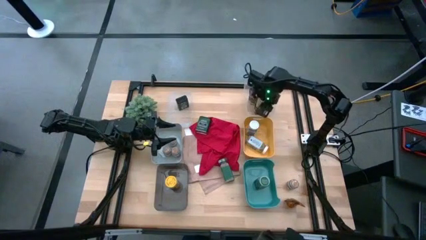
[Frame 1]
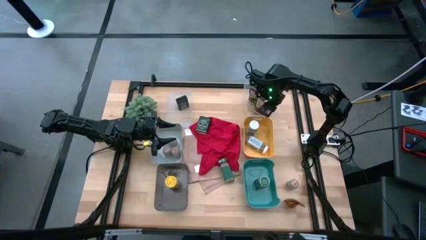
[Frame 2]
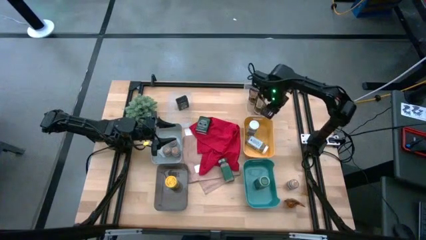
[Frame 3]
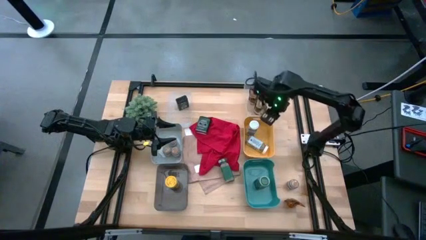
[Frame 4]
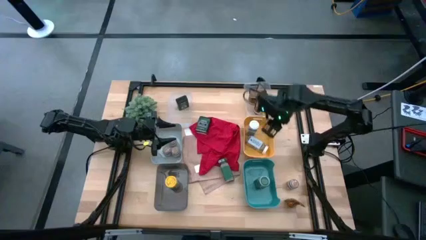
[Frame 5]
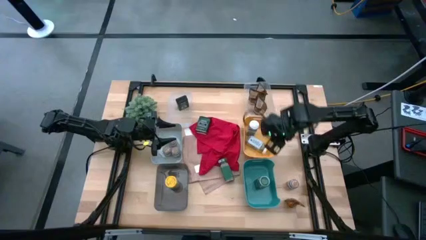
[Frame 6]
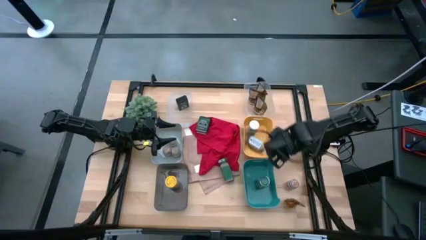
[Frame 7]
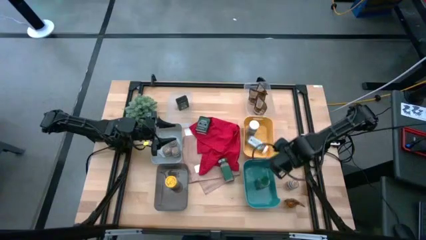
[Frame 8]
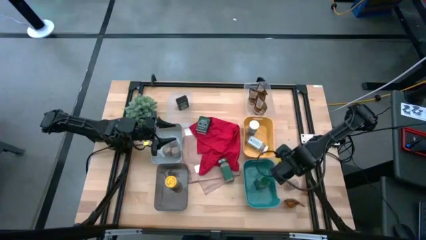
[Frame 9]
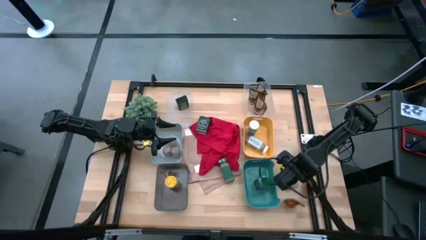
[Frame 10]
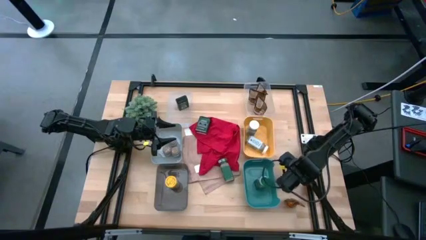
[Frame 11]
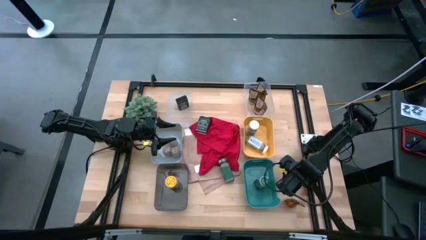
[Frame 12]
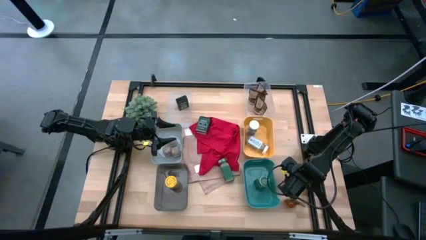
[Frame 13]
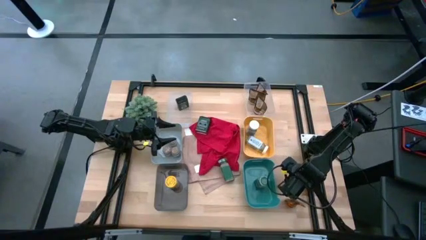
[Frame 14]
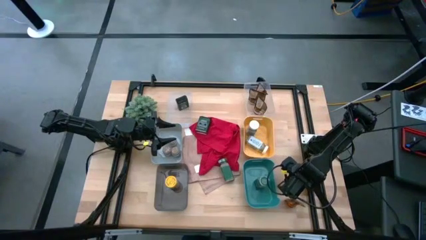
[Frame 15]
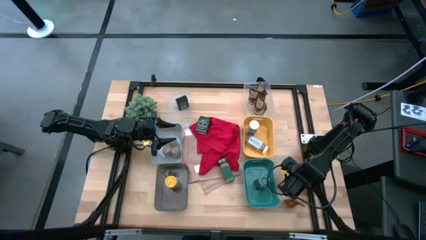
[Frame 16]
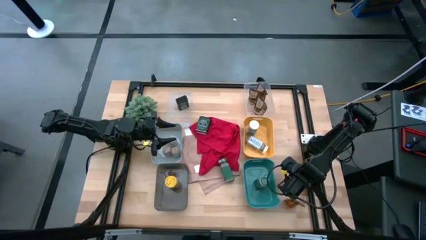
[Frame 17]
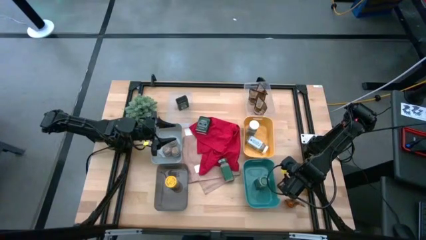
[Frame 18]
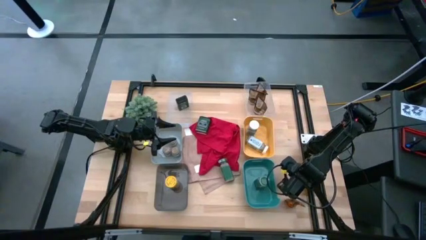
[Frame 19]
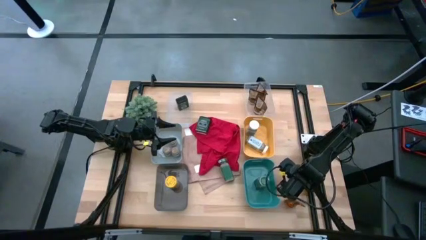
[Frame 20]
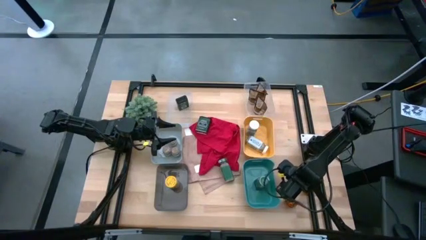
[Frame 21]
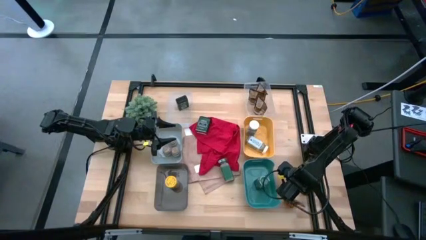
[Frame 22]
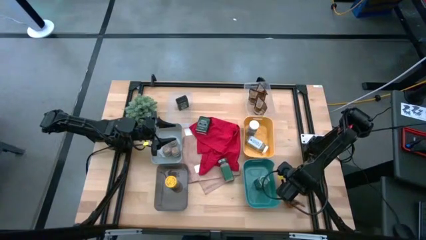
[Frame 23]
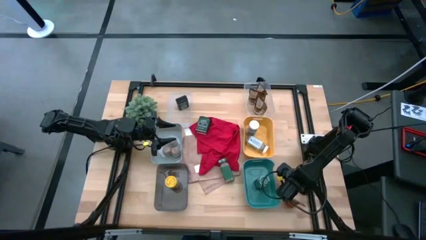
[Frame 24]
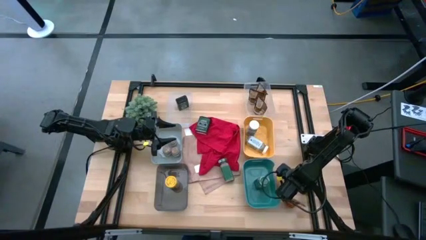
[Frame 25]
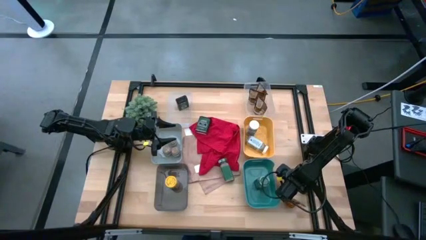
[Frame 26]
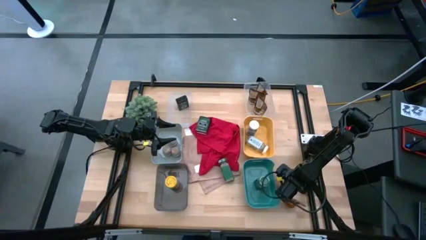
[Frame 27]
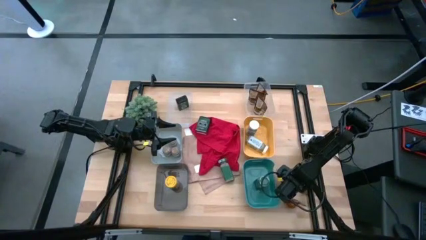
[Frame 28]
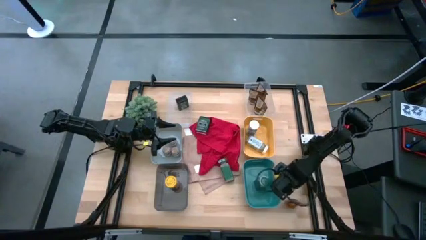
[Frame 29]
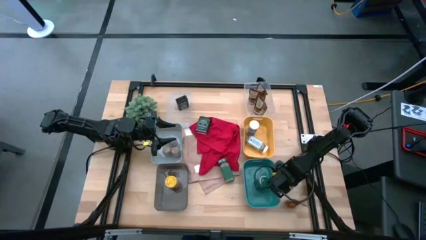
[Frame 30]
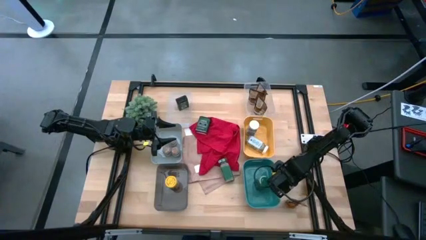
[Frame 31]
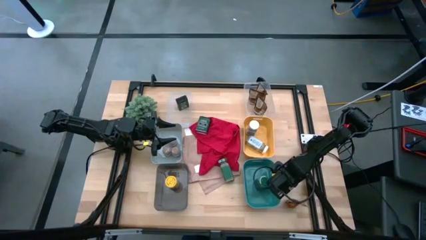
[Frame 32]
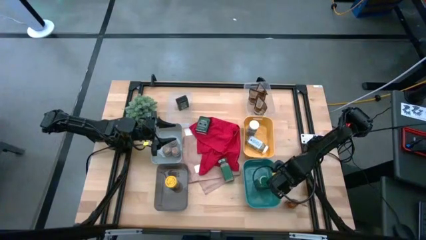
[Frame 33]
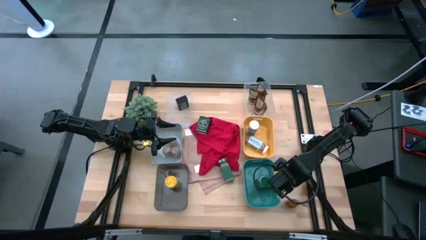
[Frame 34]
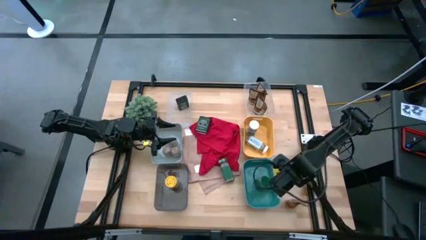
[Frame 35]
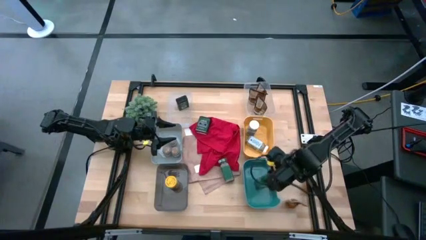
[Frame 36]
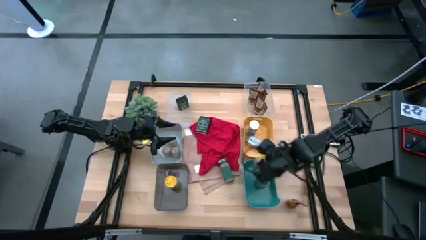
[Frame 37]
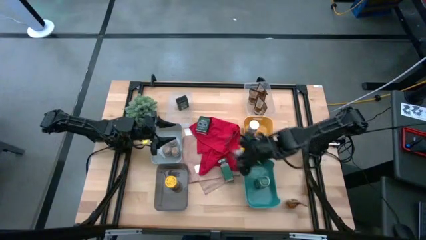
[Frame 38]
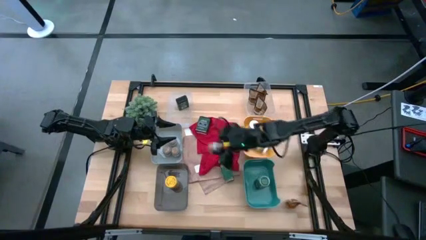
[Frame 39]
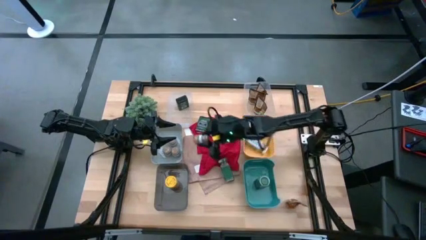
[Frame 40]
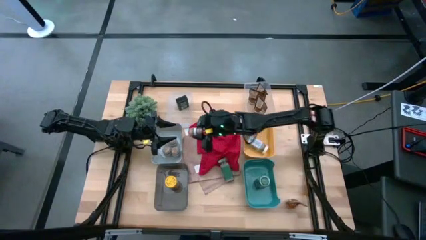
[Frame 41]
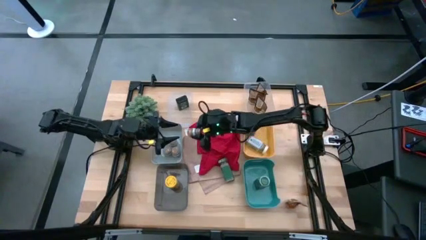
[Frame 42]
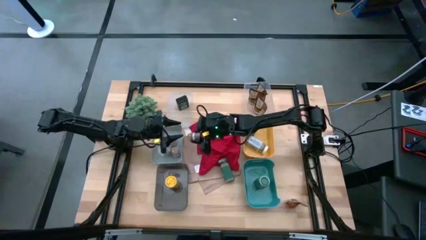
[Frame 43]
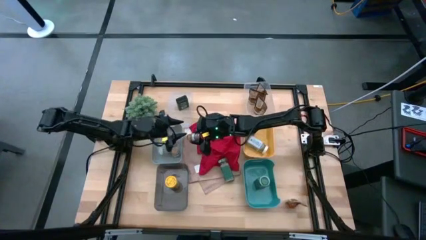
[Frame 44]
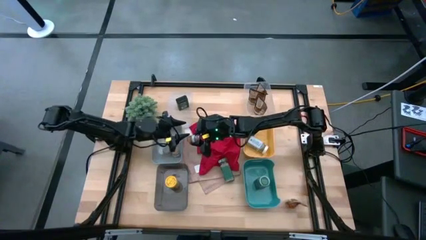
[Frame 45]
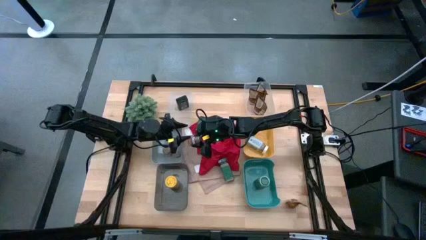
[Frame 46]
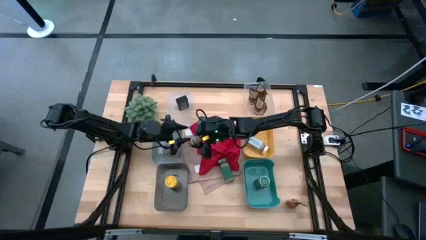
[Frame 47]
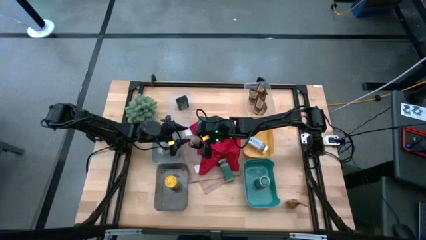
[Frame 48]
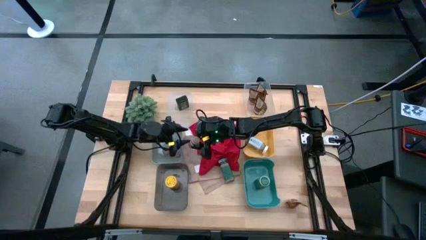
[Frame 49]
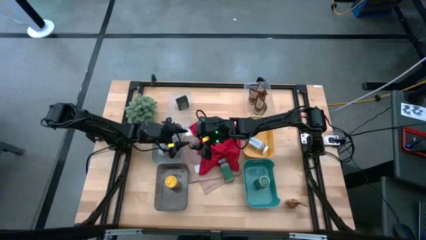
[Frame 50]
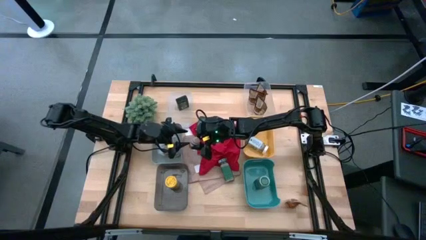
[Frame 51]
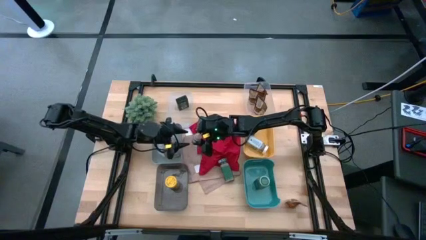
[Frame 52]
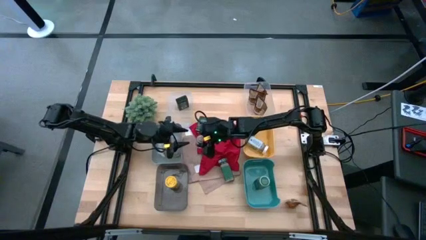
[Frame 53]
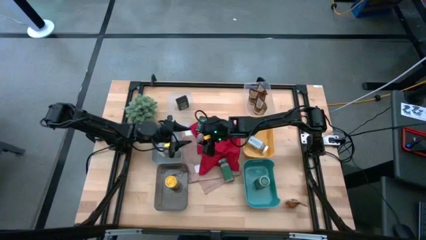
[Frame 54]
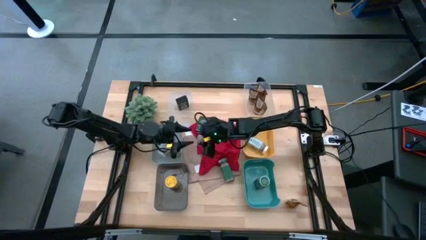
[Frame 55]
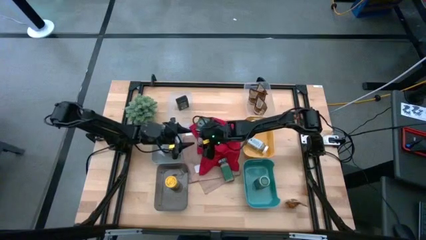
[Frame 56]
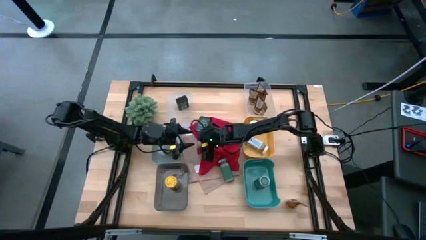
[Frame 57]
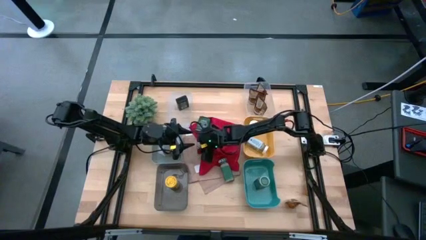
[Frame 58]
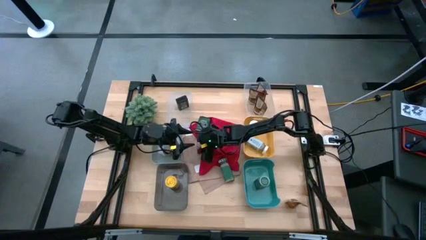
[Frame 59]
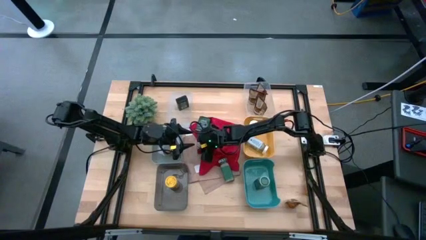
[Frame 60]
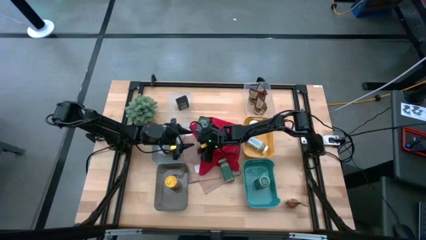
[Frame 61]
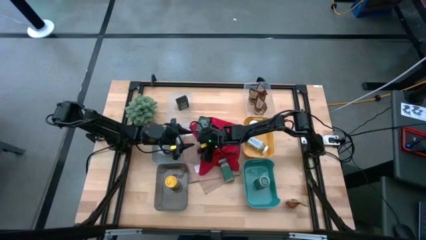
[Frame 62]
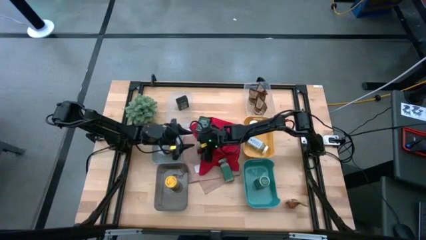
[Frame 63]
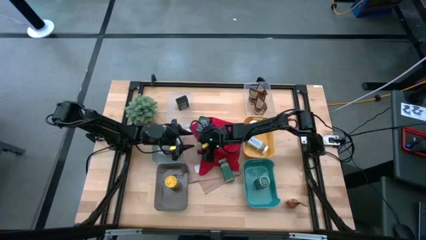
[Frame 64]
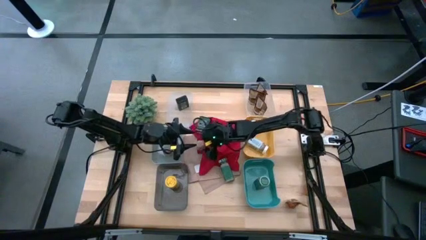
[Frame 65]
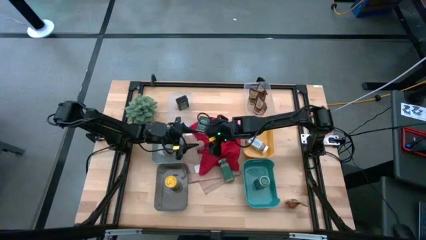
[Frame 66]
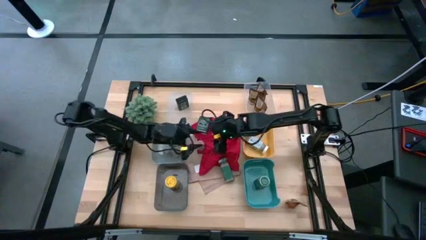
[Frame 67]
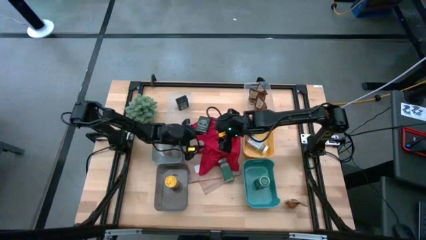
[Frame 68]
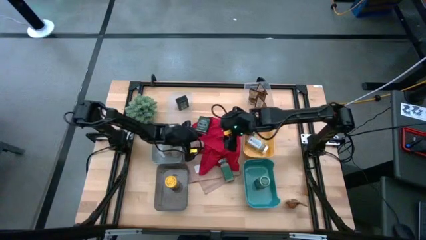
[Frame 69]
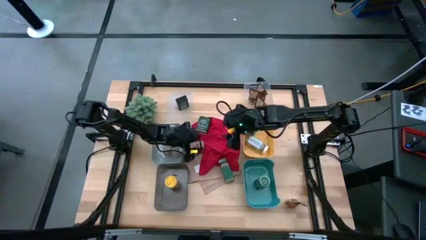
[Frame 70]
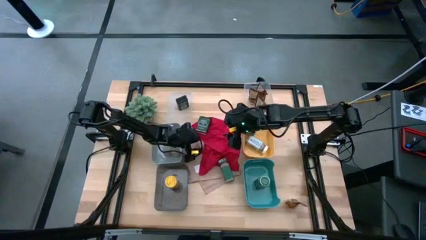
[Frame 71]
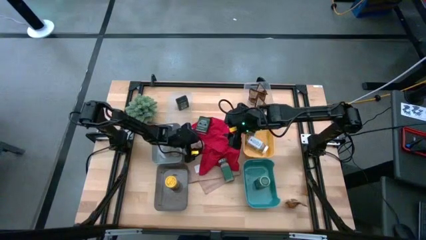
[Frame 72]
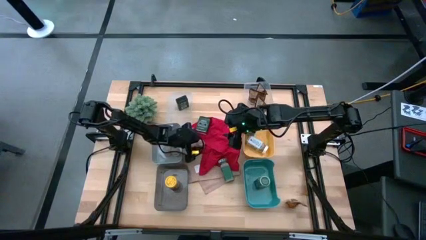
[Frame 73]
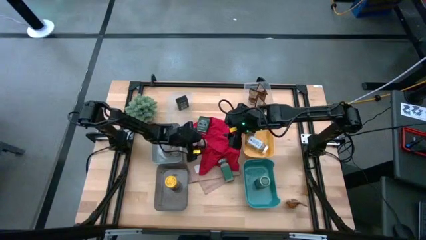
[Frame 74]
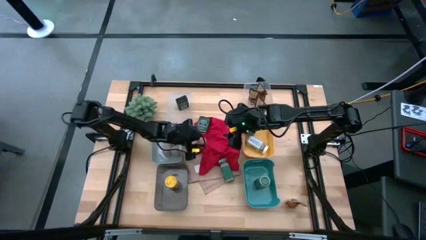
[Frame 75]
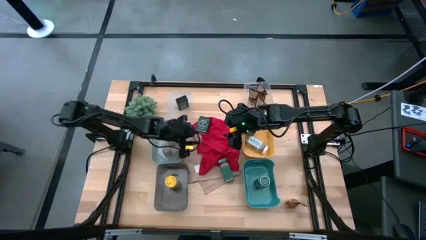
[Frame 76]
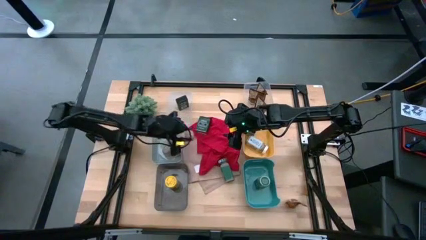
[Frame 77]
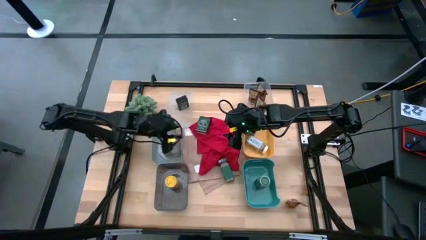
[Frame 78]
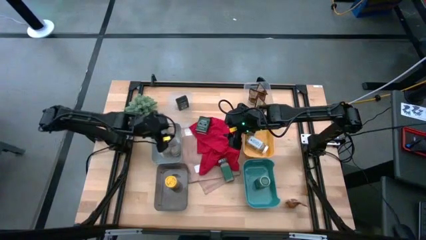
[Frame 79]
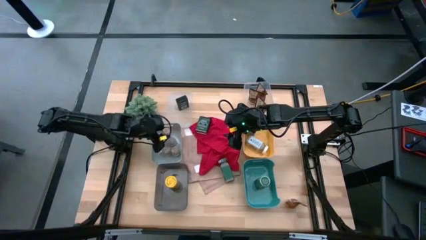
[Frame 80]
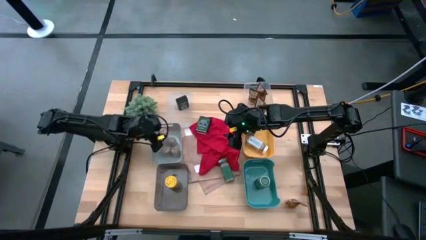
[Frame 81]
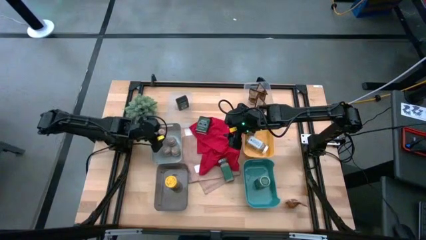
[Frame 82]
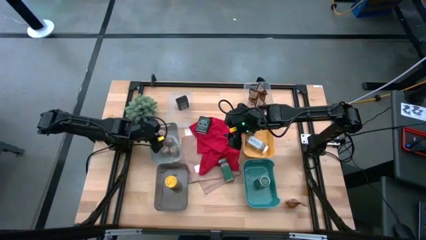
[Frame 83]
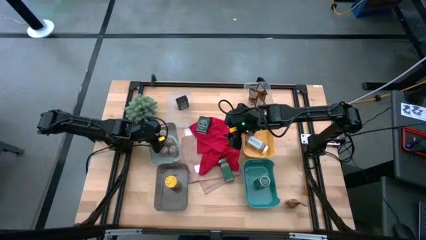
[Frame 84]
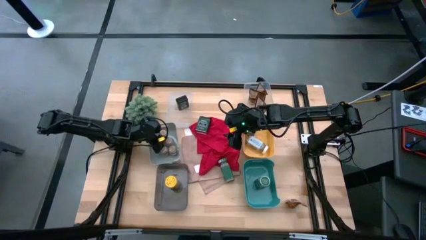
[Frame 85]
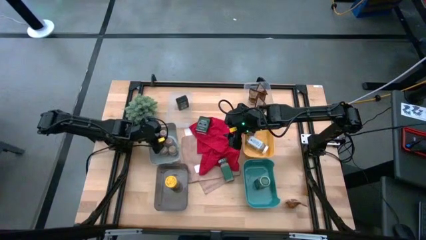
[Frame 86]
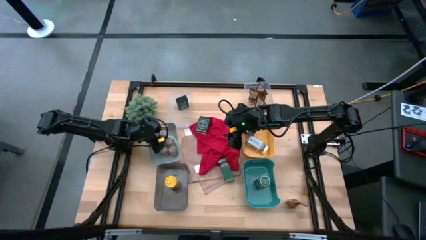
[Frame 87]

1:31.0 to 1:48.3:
Task: Sort spices by type
Put the brown seasoning bottle into the gray bin
